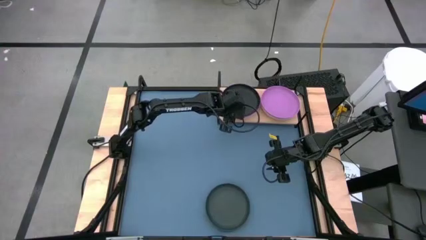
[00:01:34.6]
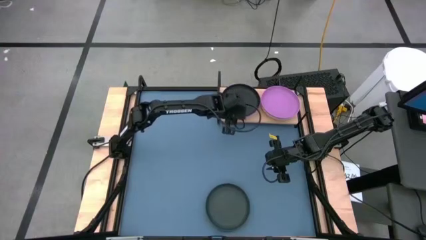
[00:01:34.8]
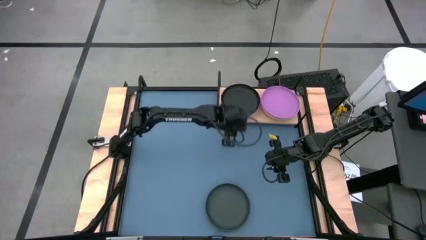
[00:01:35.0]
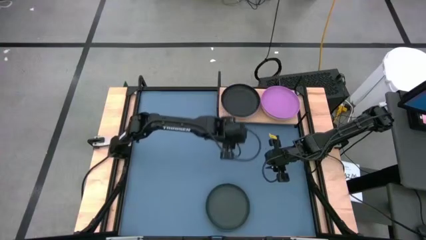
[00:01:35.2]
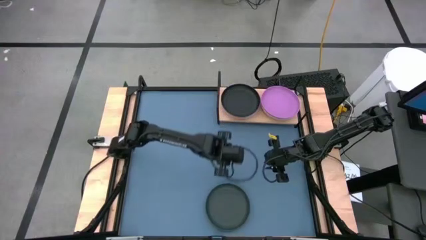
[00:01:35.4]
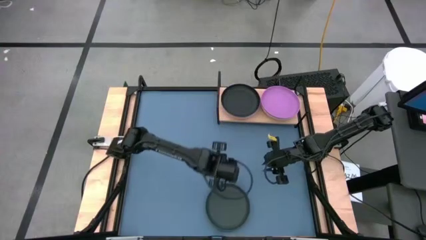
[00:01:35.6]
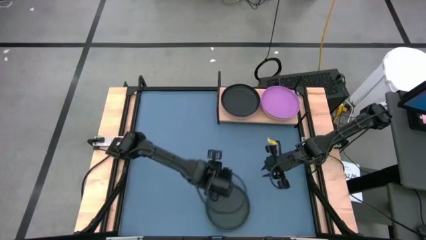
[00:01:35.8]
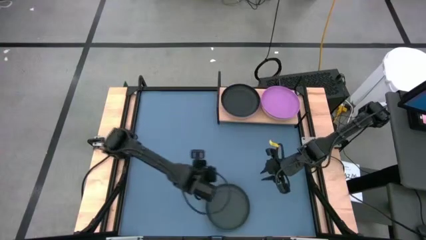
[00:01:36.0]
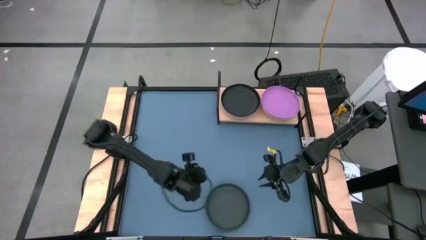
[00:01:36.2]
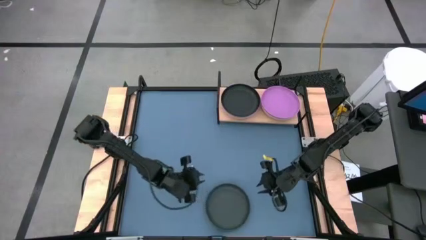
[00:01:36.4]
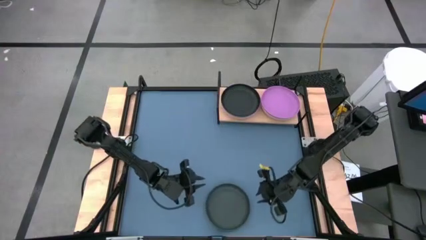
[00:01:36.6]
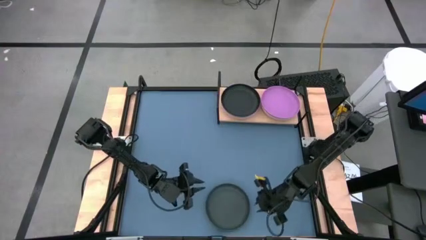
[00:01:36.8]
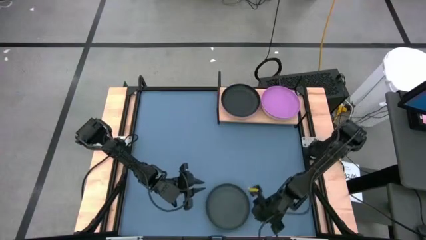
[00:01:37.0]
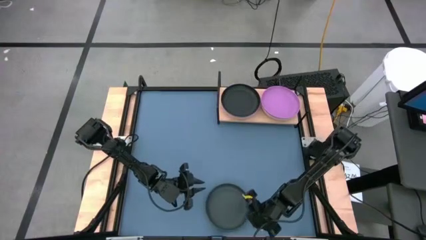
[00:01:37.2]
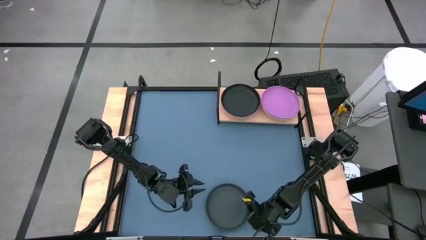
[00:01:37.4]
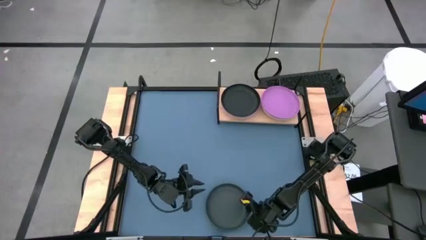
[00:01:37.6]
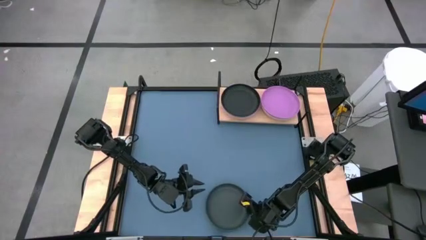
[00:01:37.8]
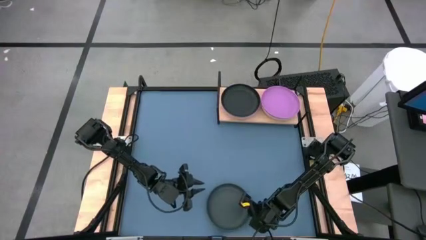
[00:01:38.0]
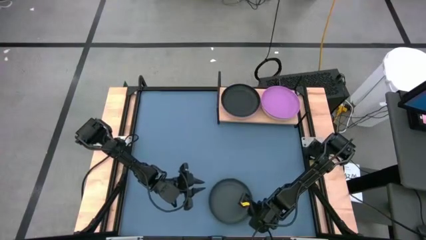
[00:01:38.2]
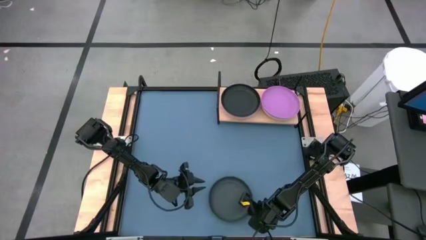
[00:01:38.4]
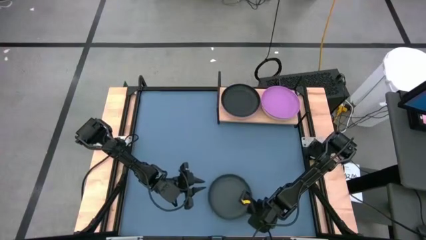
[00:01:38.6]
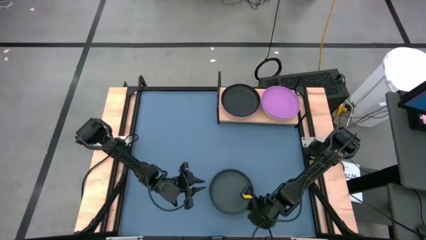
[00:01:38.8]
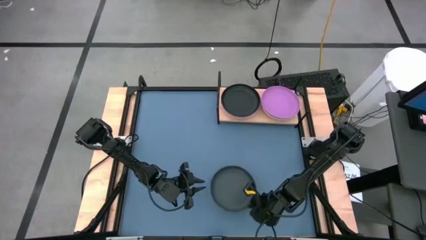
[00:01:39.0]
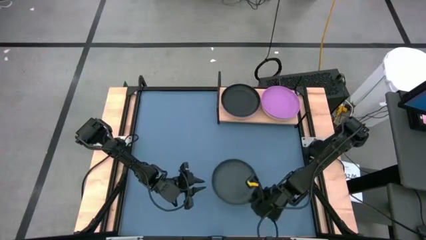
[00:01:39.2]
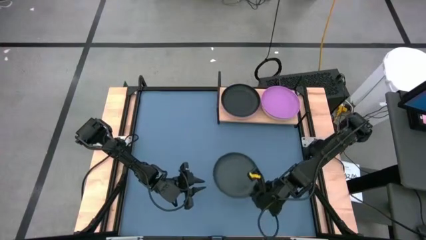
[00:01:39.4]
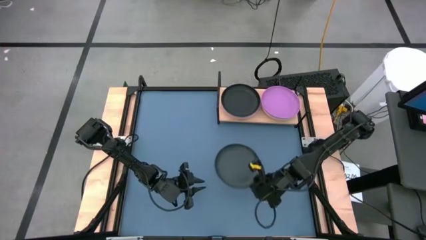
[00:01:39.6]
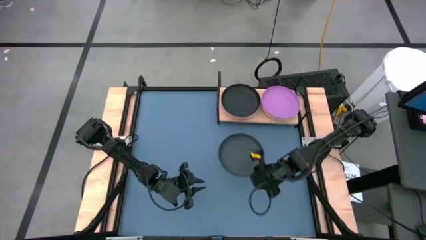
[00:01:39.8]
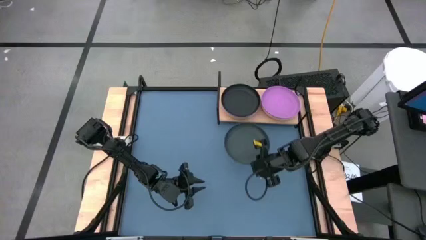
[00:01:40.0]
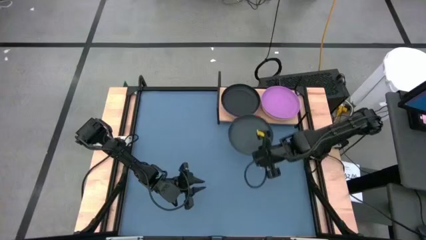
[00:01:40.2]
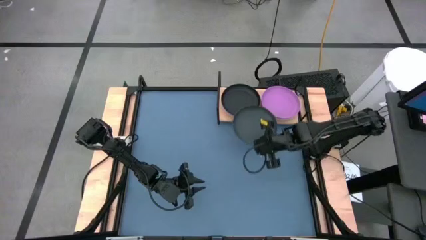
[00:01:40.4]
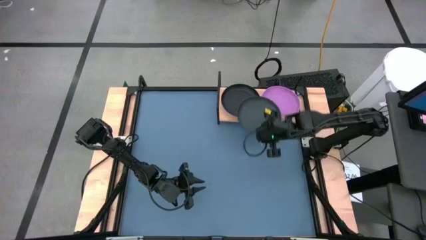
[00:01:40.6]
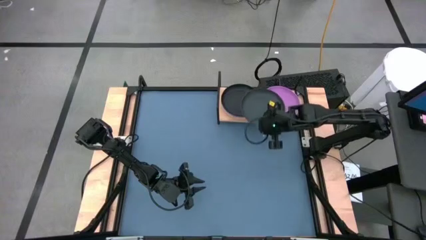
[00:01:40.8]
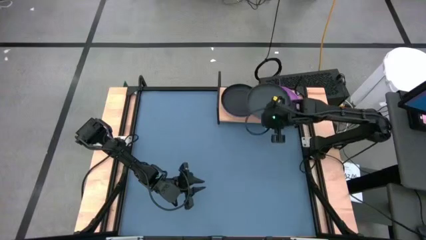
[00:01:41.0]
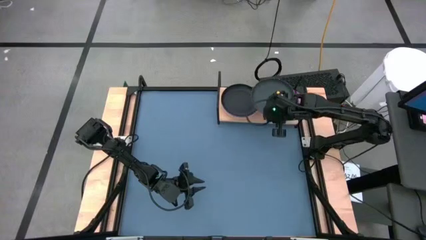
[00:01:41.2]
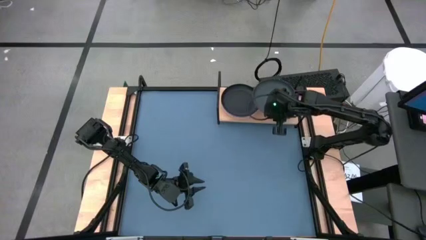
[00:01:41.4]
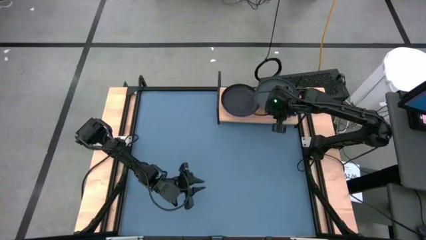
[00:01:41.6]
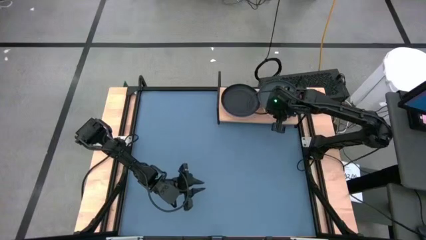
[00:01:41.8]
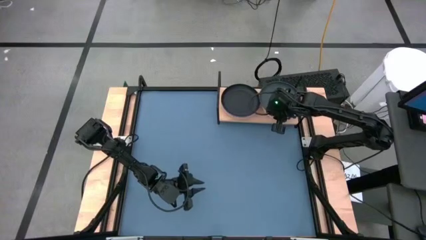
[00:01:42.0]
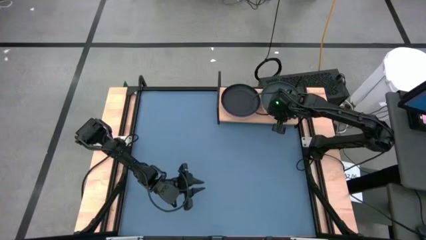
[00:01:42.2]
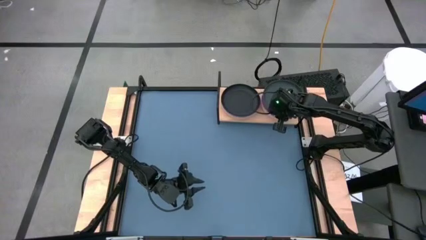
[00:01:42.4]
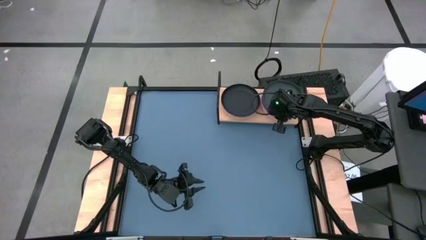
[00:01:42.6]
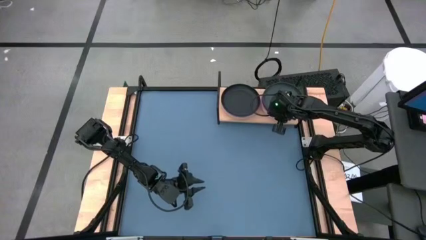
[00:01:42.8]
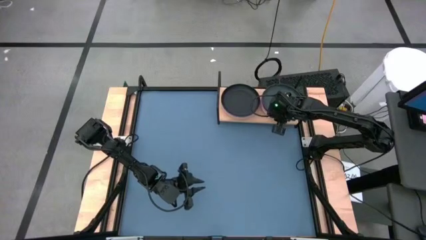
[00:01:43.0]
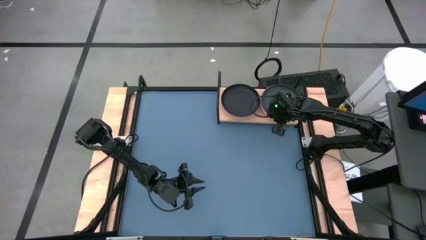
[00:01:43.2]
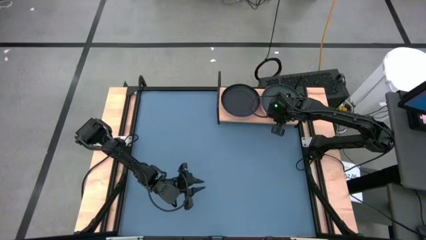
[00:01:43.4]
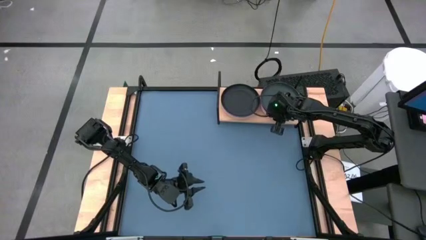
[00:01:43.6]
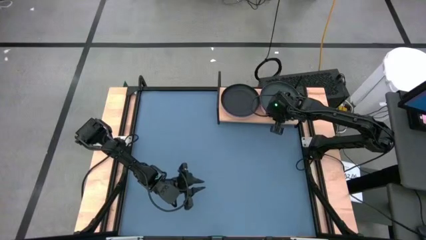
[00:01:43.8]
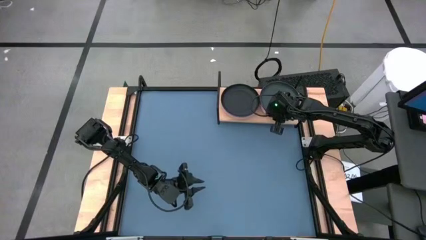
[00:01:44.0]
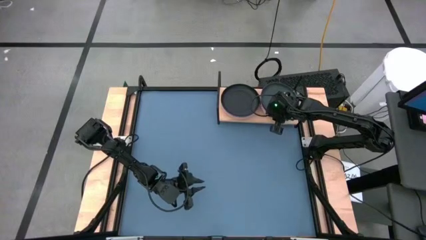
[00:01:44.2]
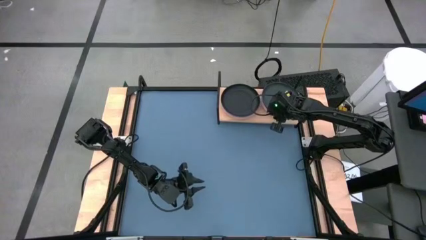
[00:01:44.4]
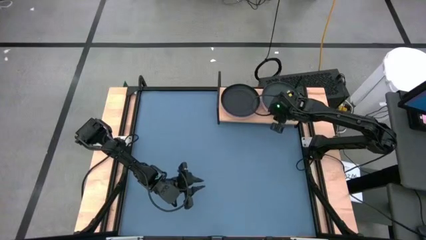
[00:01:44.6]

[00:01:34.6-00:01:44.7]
Task: Place and stack plates onto a shelf
Stack the black plate on top of the purple plate on the shelf

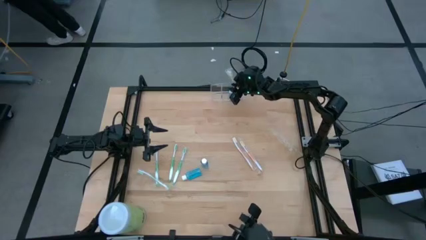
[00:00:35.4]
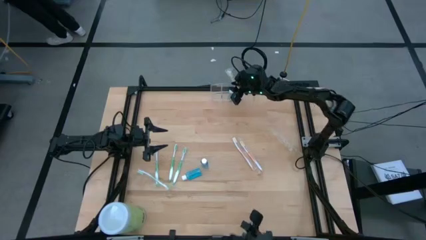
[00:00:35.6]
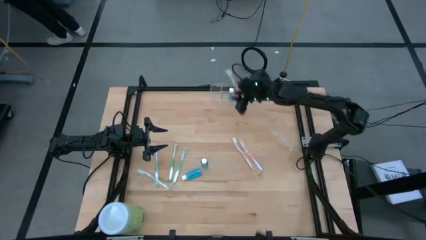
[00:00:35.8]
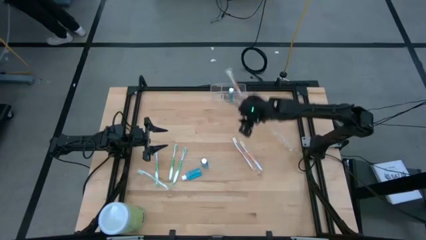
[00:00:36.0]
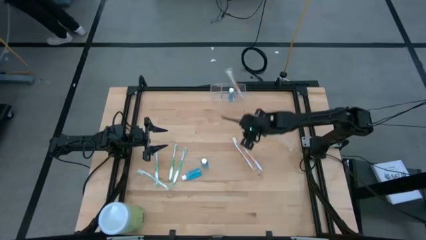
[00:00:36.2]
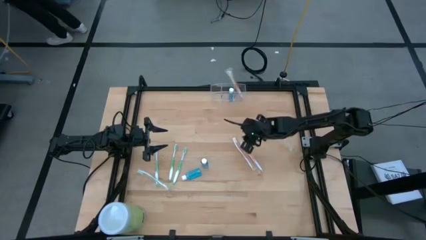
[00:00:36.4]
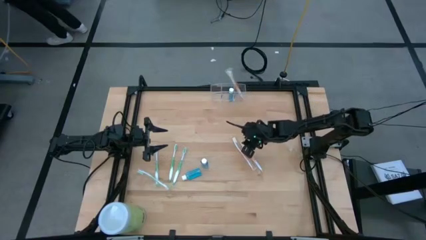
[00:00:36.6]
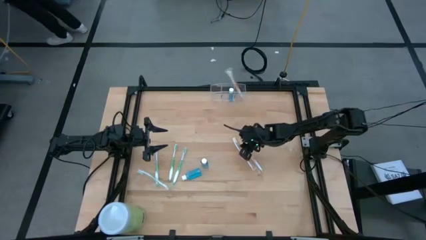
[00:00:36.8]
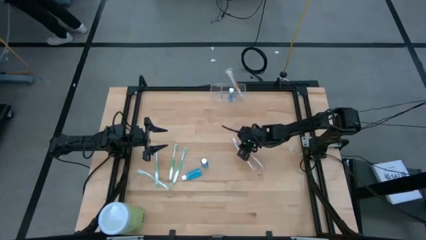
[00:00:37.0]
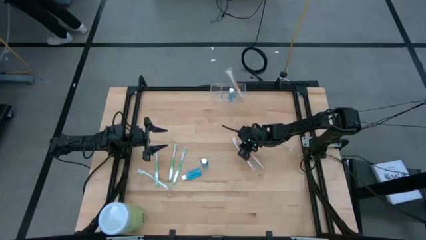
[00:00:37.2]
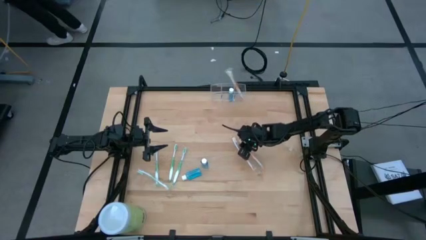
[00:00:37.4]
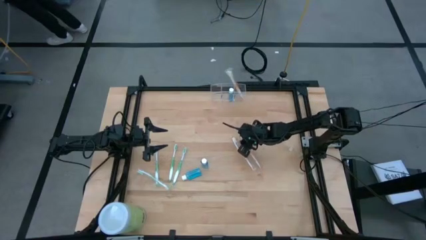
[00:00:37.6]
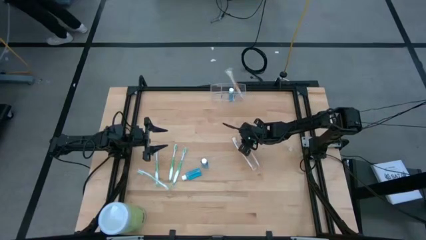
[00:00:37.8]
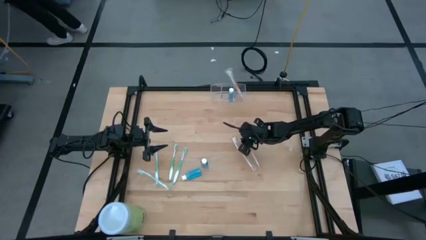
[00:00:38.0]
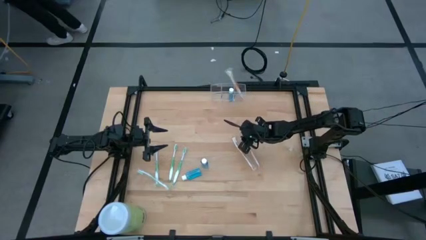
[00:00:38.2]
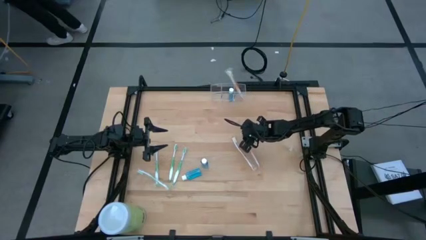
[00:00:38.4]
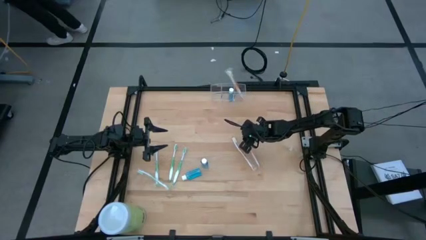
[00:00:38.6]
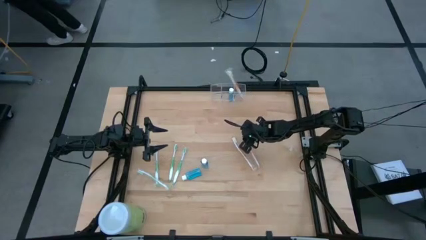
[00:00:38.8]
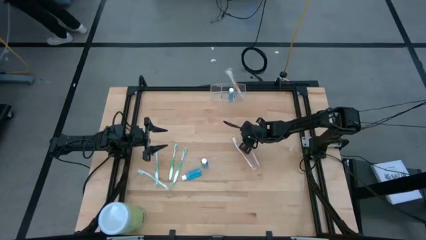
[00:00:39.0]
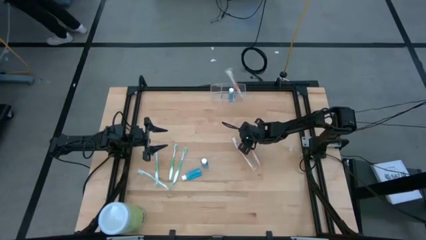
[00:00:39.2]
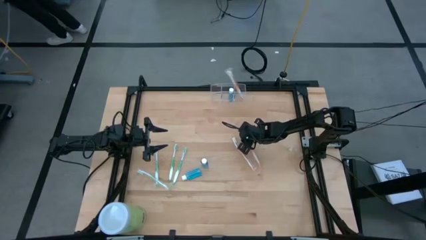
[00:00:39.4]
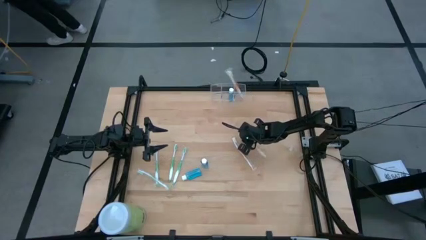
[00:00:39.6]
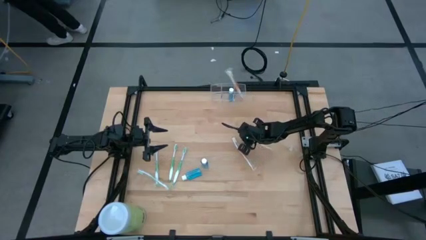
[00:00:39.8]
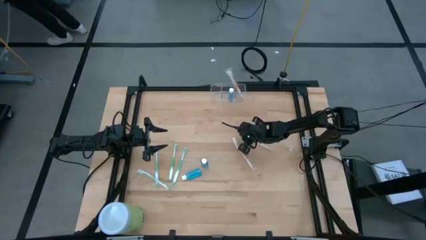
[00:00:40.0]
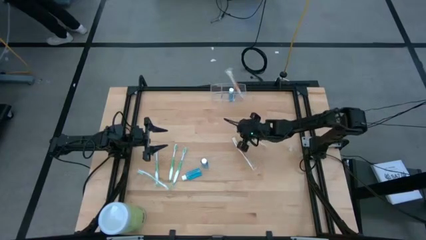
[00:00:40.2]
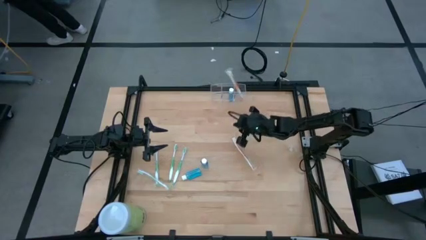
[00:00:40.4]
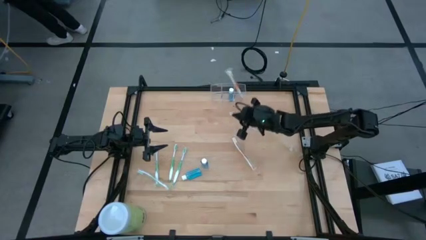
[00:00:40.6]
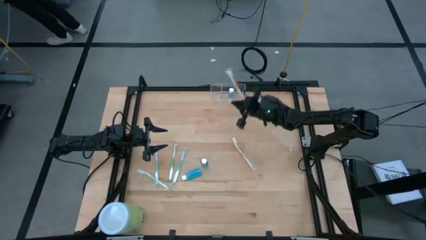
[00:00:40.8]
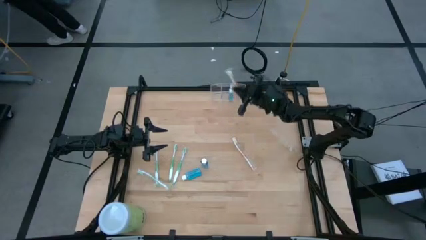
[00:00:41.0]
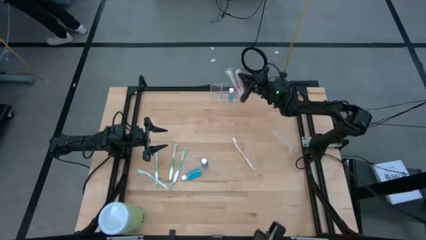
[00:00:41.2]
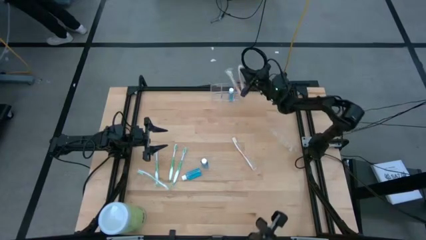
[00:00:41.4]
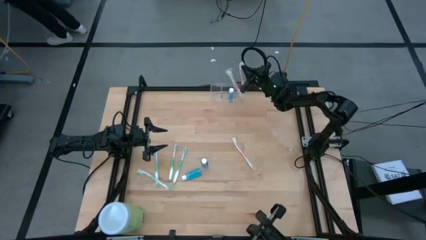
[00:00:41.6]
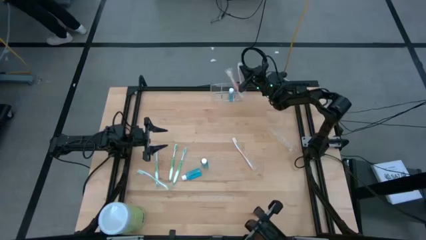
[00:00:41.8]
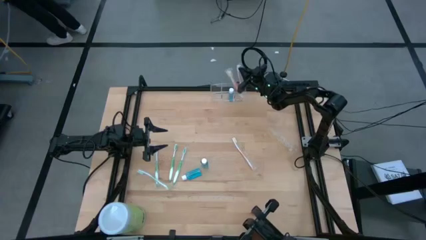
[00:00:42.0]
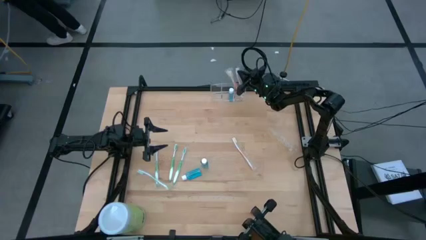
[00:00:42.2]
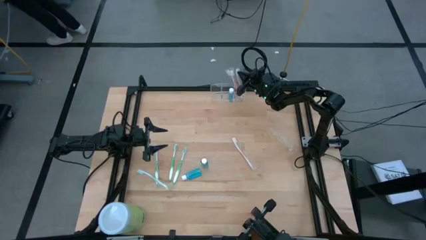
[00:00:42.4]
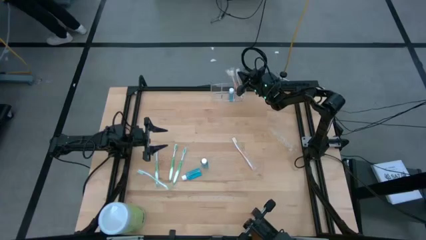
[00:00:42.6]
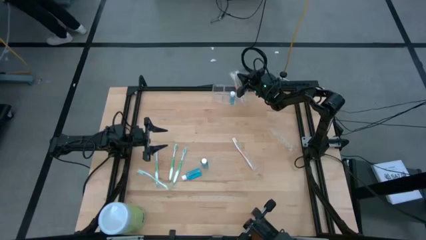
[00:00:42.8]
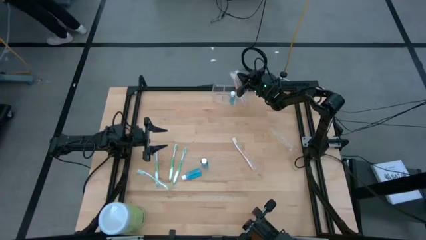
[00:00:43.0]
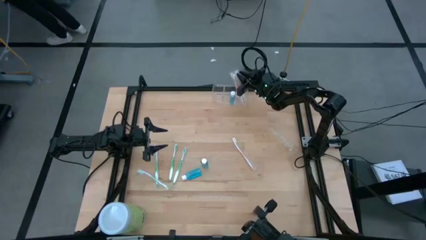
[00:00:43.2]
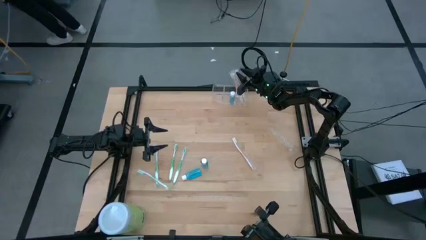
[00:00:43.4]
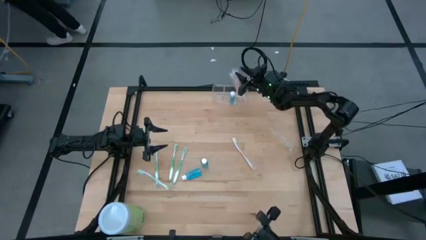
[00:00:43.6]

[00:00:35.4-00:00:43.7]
Task: Pick & Place toothbrushing station
Put the orange toothbrush into the transparent organizer
